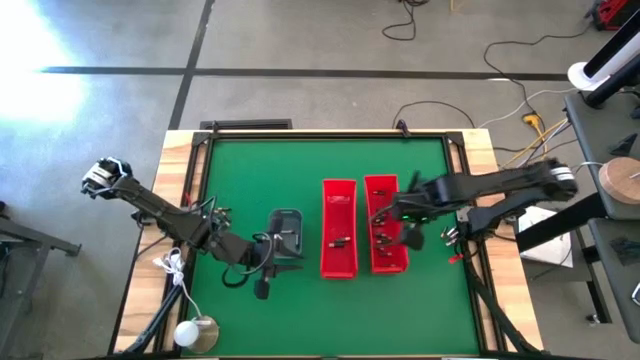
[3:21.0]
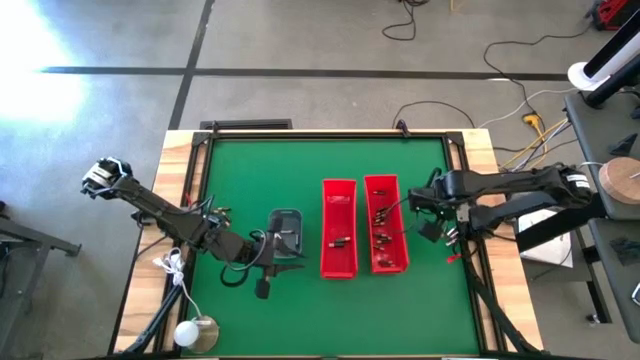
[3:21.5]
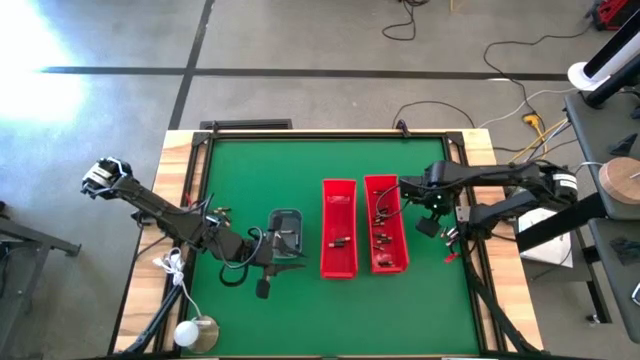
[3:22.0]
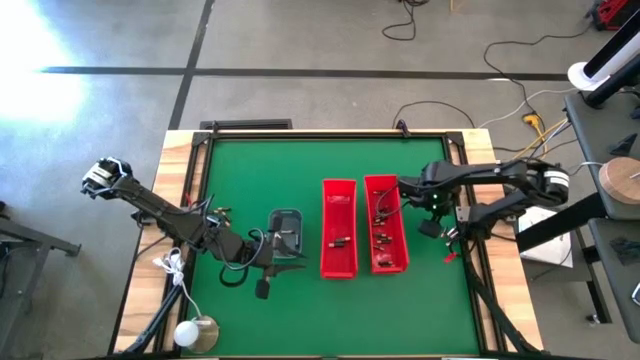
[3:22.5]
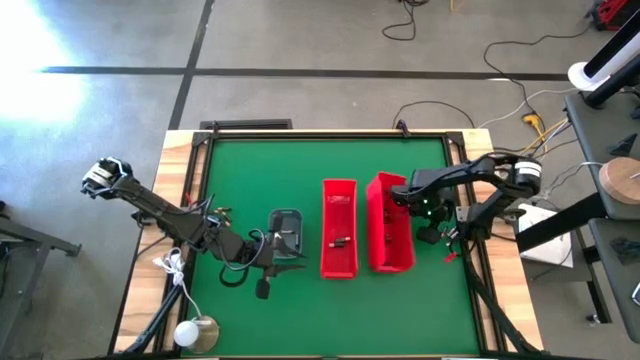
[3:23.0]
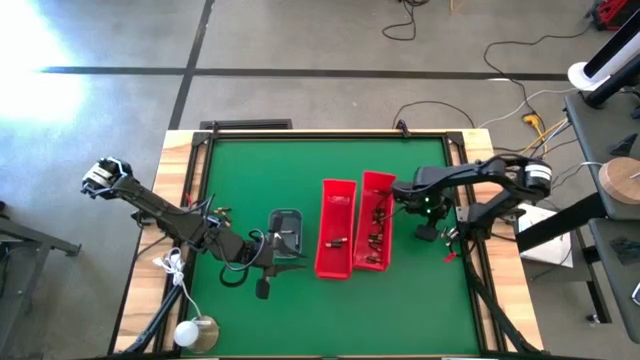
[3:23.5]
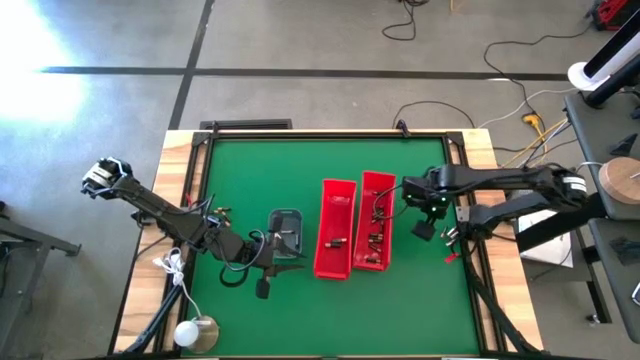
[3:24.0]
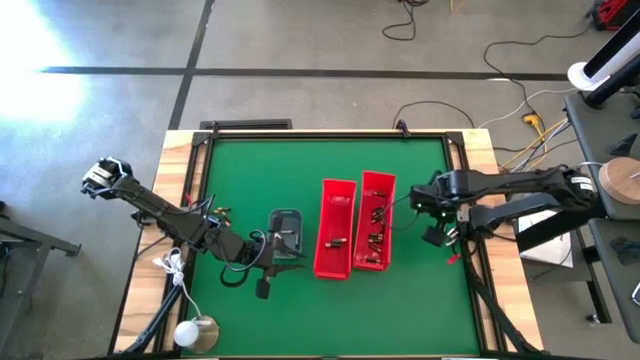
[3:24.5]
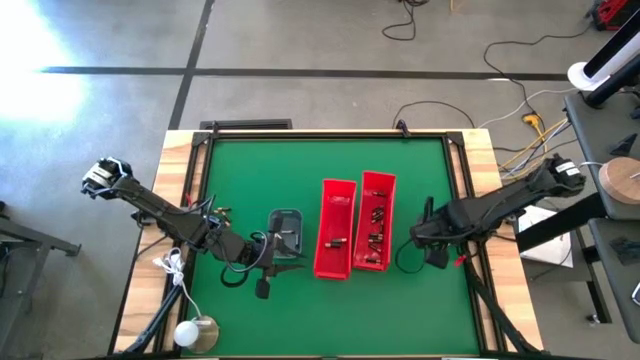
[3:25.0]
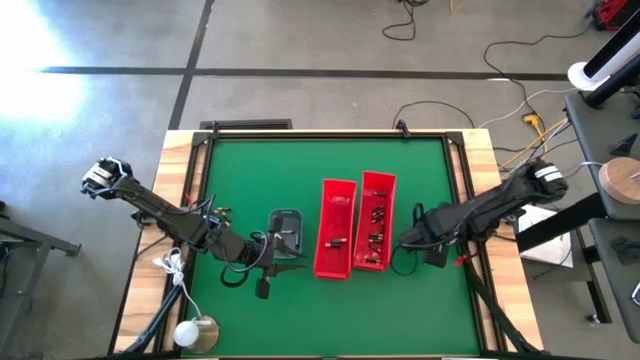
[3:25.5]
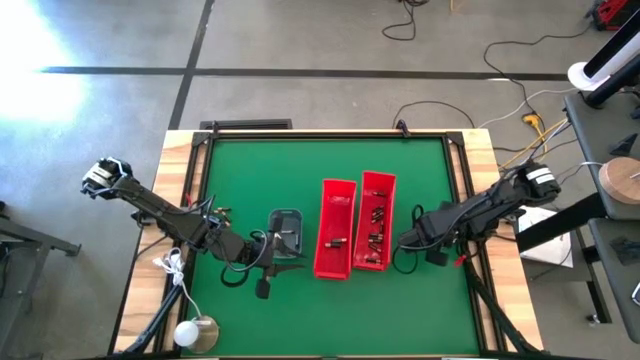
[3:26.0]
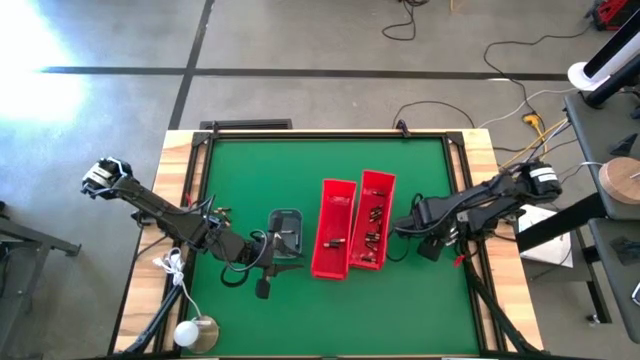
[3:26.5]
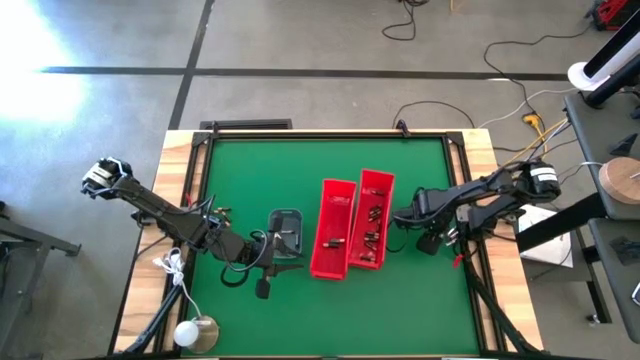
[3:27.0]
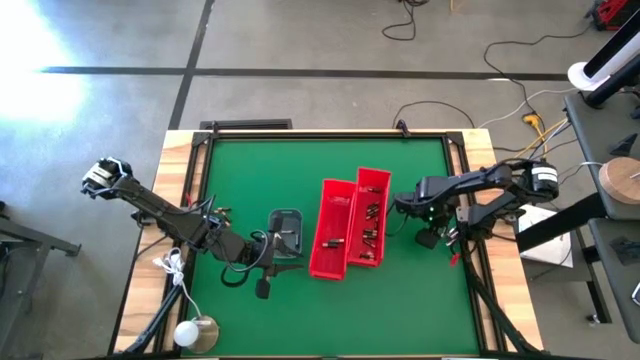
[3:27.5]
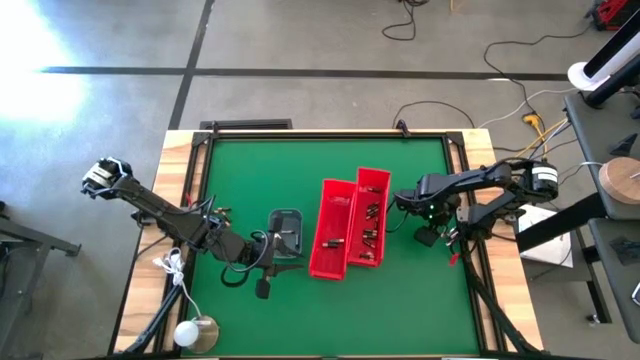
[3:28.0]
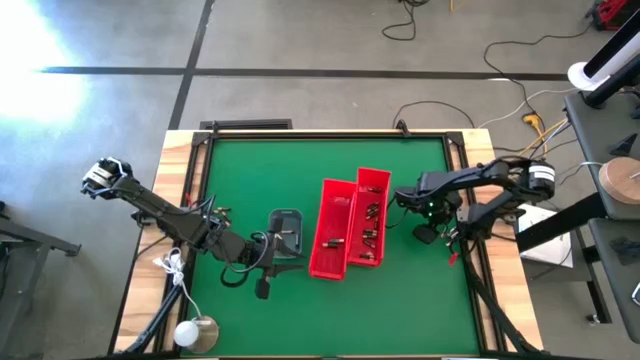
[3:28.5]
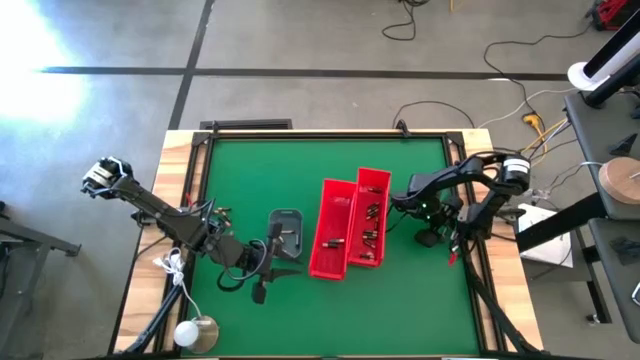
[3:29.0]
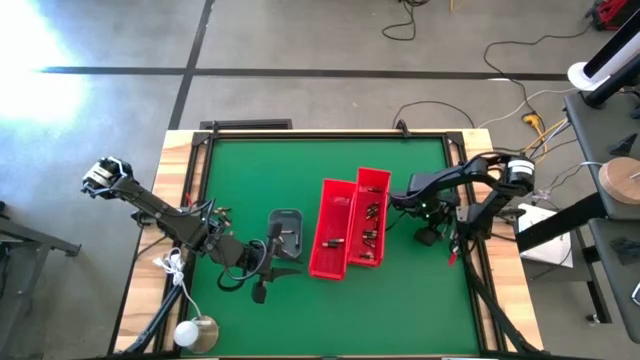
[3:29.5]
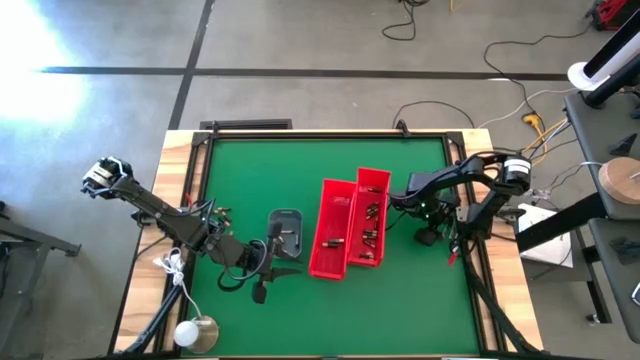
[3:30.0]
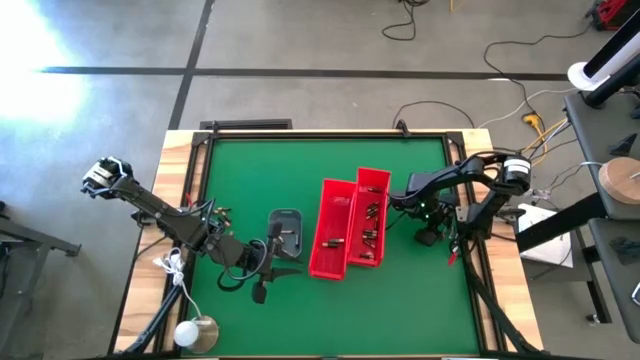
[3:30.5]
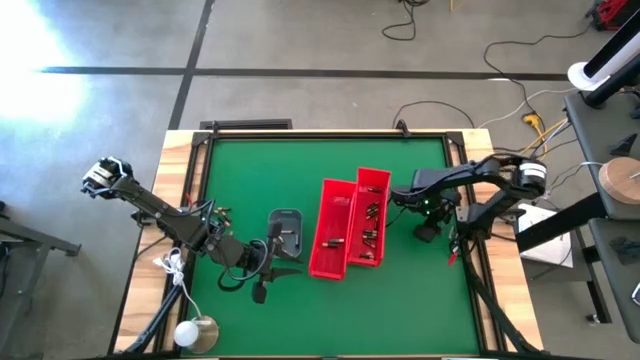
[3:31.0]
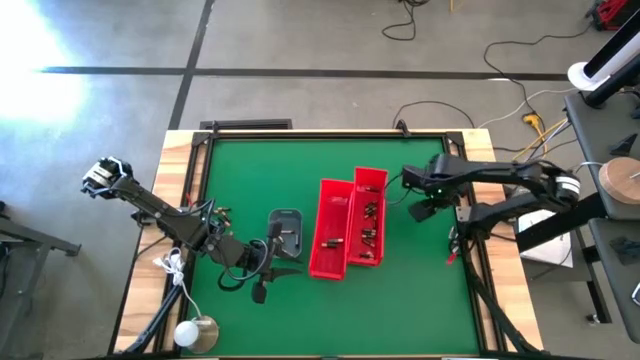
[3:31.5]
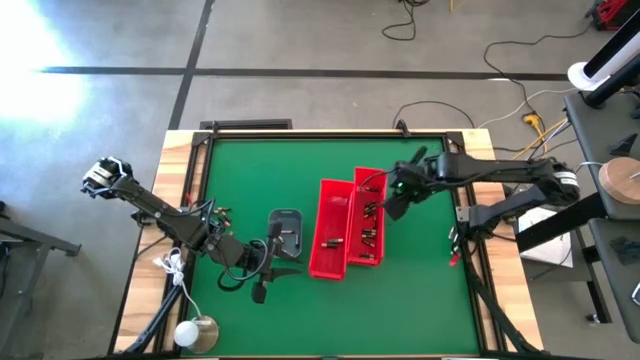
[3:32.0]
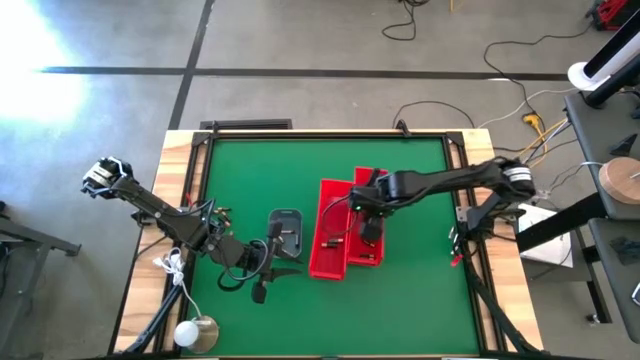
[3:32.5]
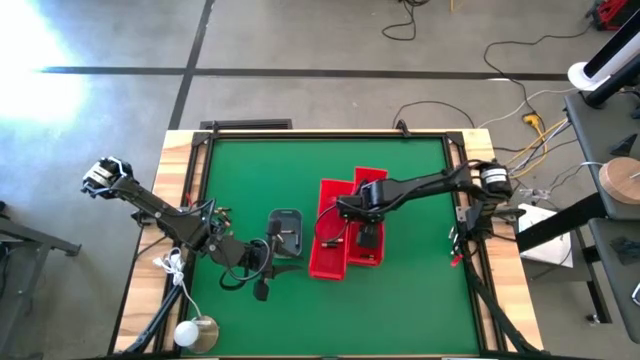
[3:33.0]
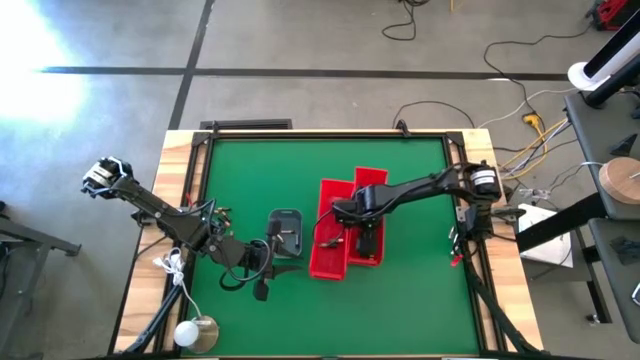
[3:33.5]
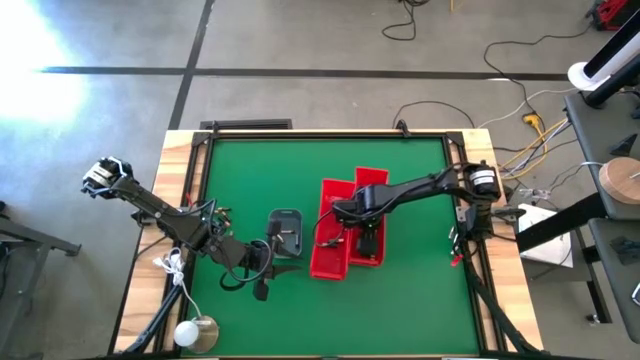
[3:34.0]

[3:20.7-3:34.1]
Task: Sort batteries
Put the black battery into the right gray bin

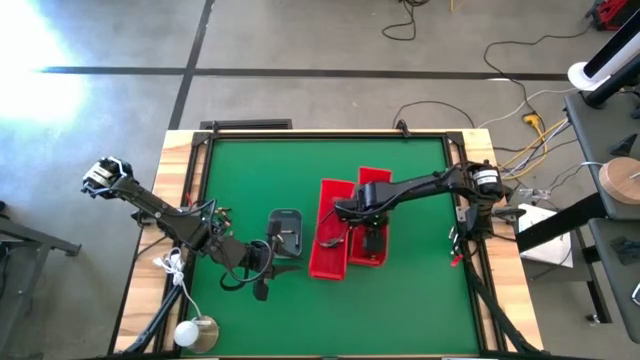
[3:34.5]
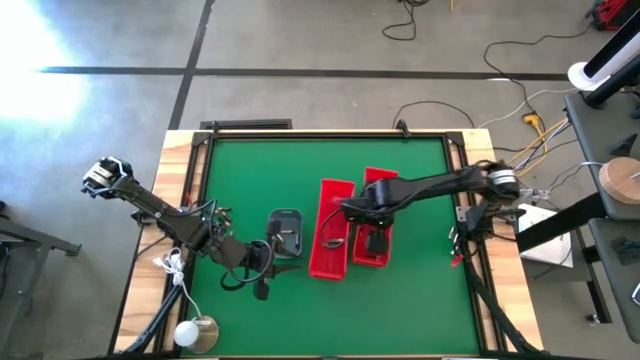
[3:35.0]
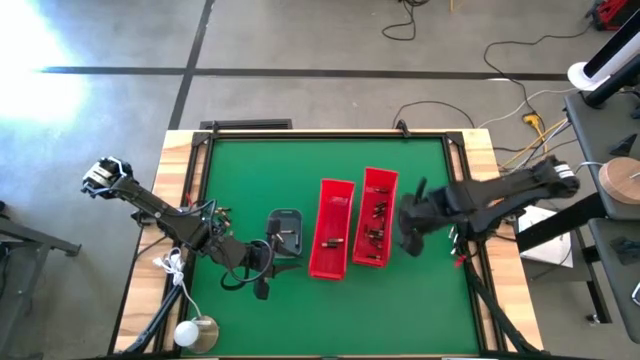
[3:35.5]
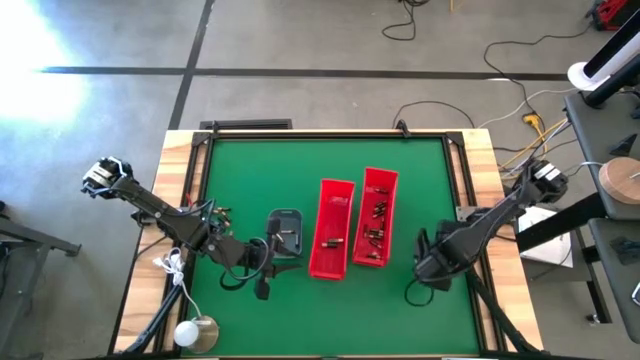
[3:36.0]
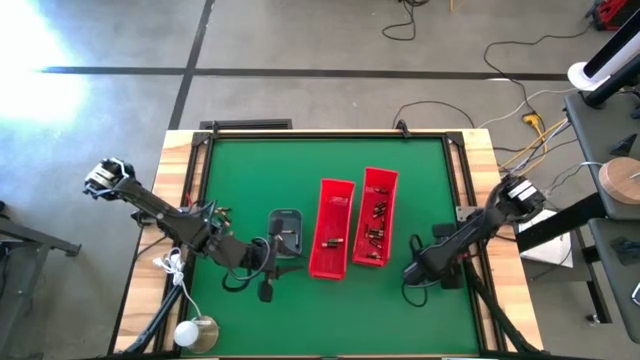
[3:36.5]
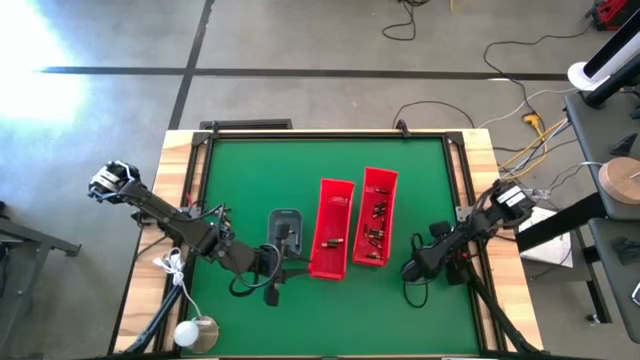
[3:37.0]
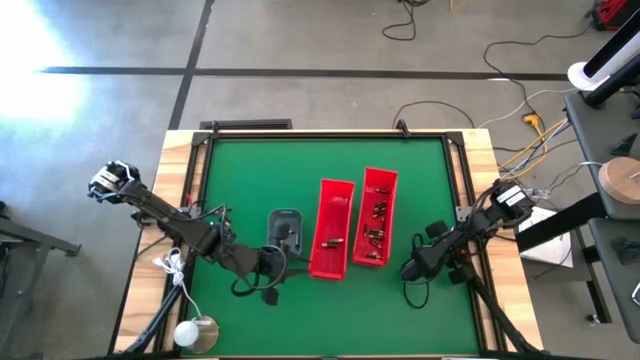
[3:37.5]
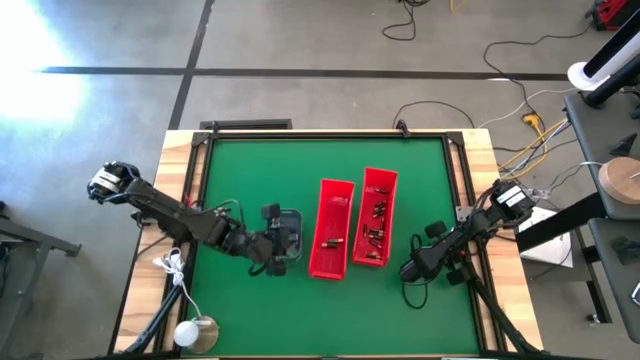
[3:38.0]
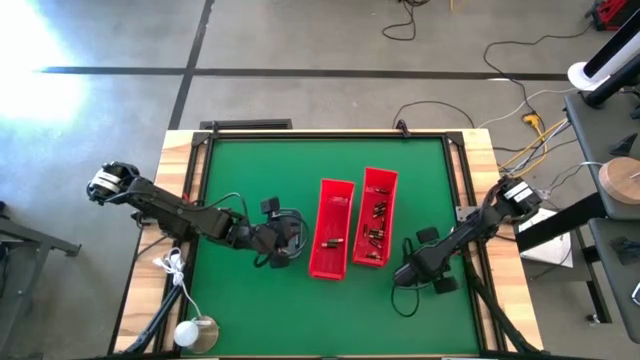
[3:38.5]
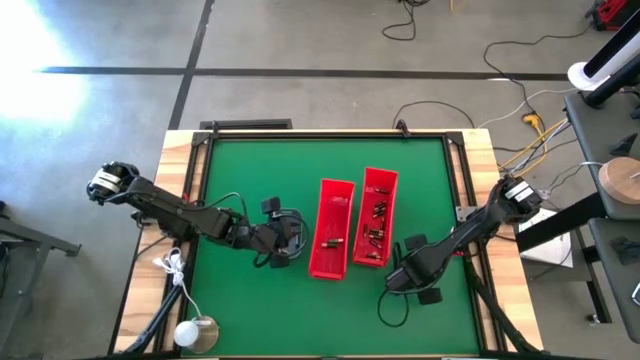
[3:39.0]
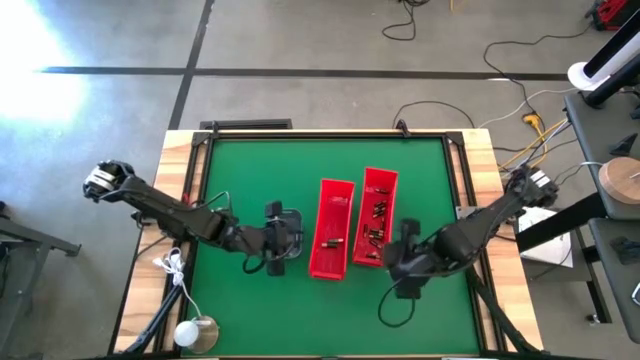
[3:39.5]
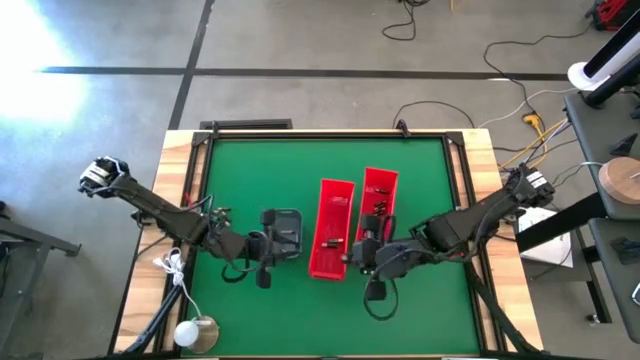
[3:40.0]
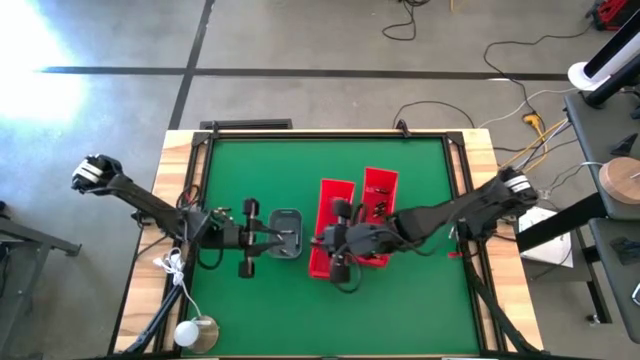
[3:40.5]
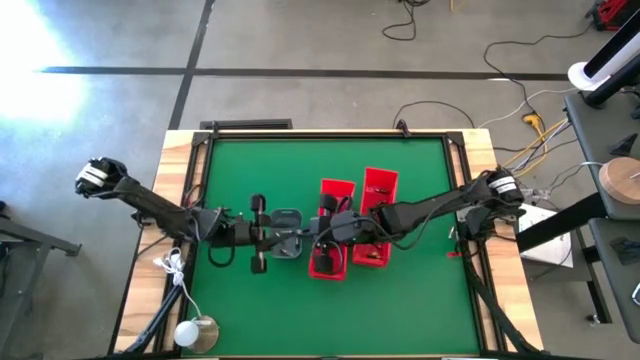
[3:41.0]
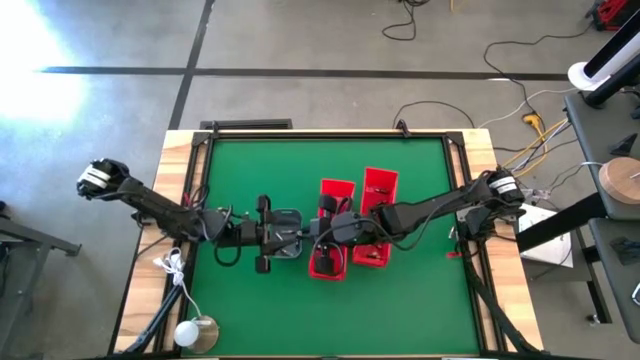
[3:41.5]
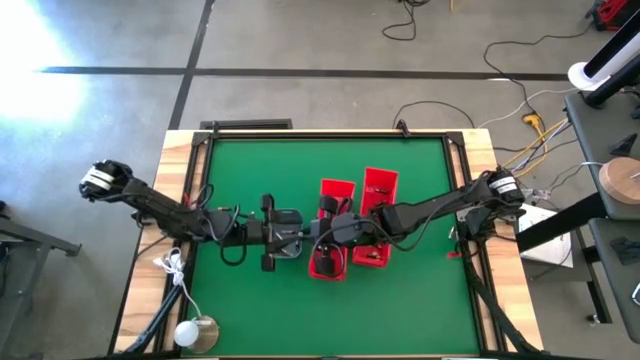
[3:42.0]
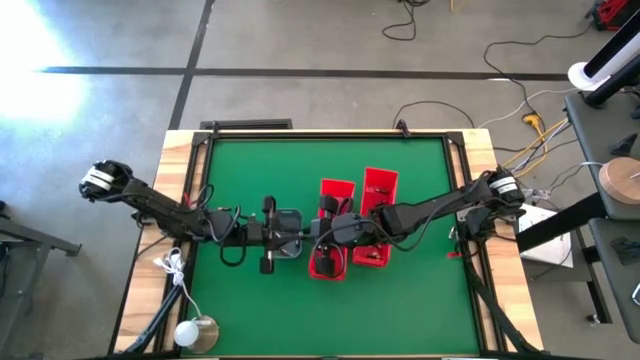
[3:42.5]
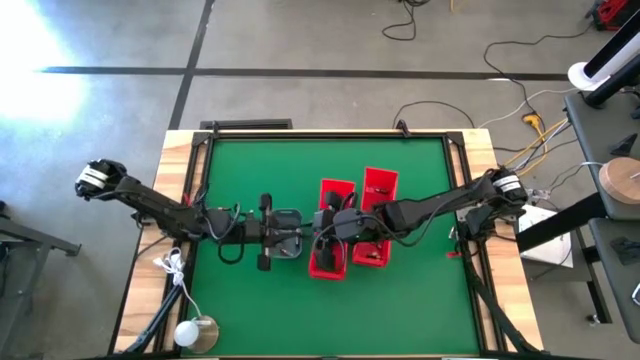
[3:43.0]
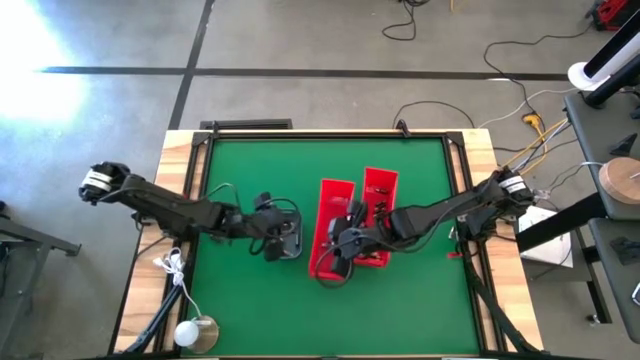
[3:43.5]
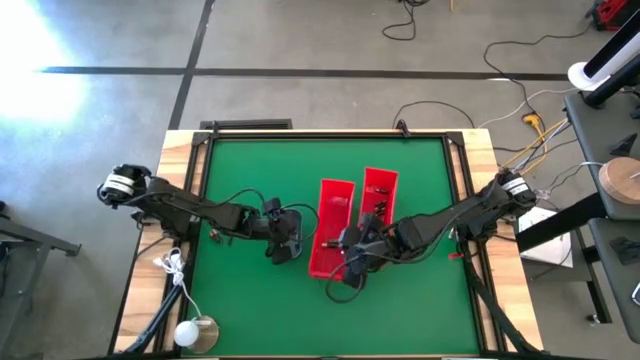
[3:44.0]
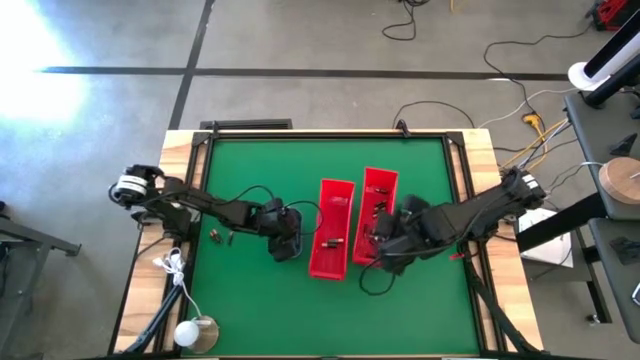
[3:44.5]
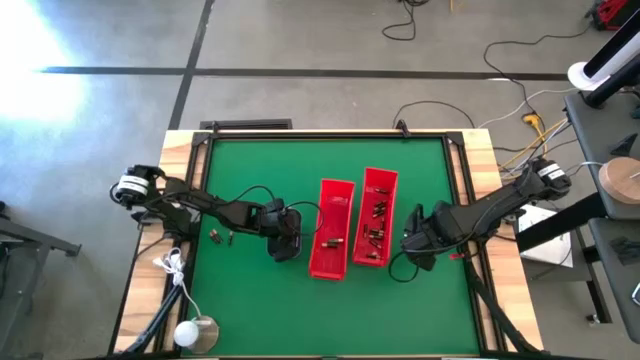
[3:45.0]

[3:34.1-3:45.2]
Put the silver battery into the gray bin
